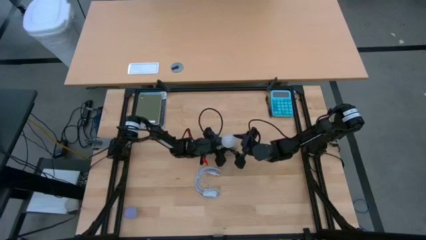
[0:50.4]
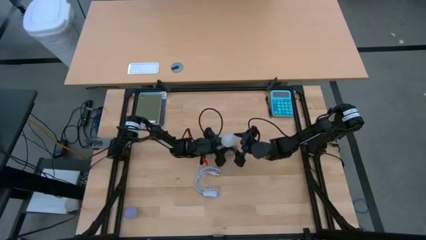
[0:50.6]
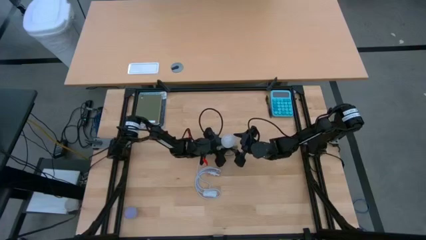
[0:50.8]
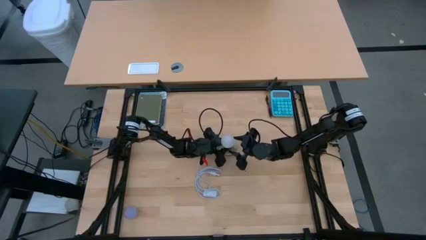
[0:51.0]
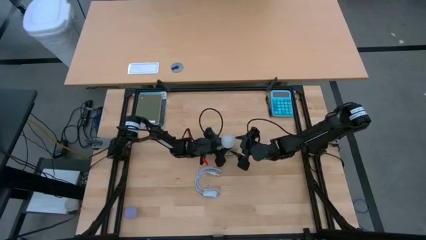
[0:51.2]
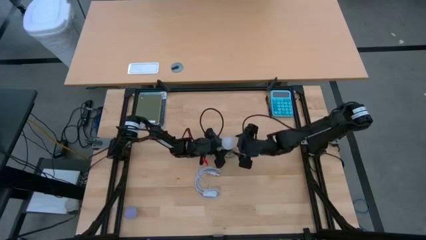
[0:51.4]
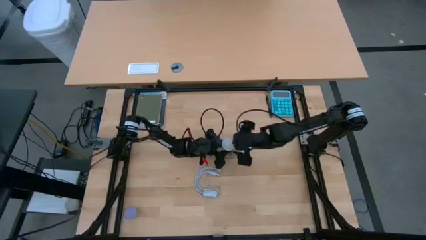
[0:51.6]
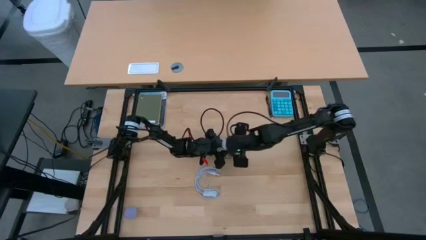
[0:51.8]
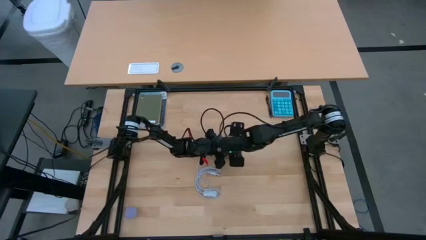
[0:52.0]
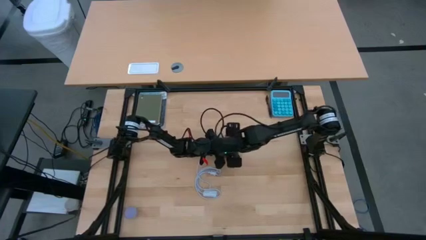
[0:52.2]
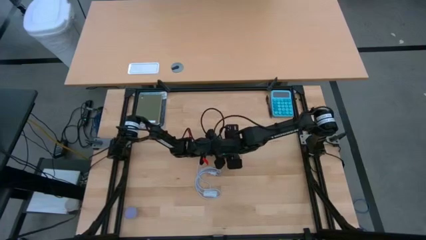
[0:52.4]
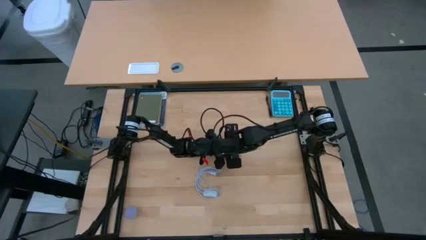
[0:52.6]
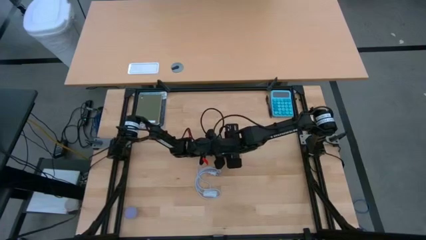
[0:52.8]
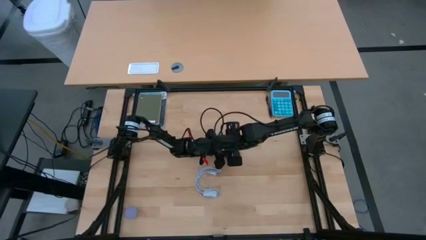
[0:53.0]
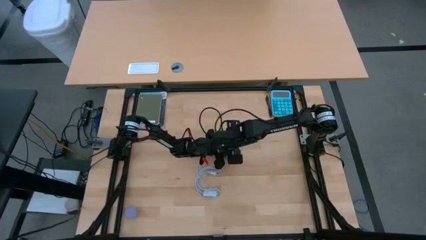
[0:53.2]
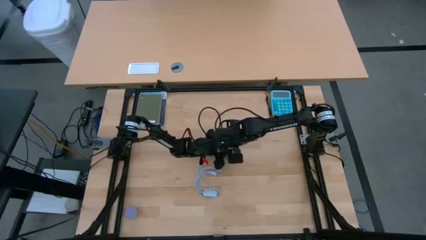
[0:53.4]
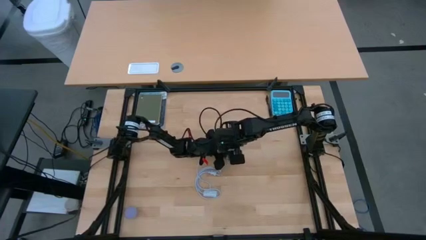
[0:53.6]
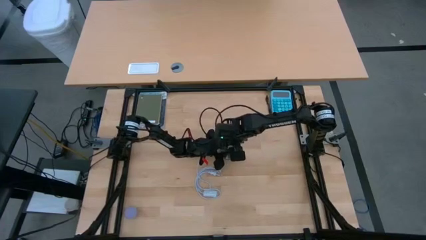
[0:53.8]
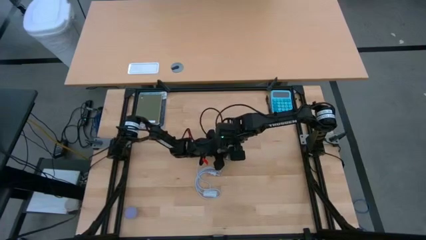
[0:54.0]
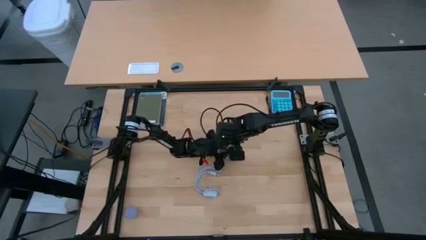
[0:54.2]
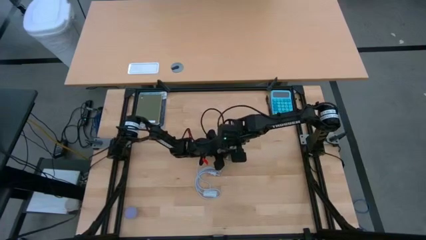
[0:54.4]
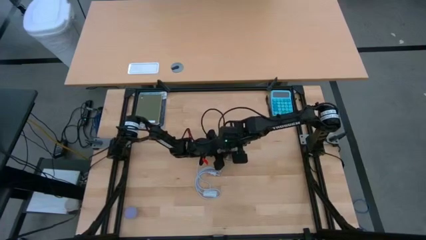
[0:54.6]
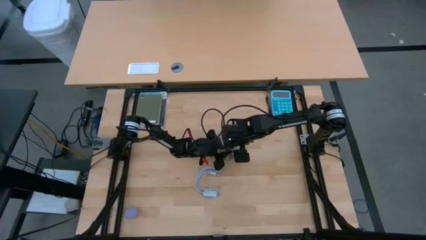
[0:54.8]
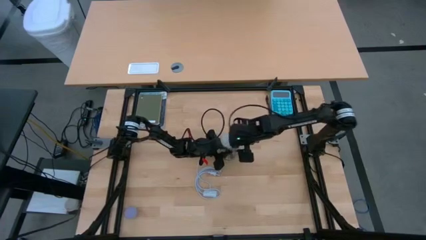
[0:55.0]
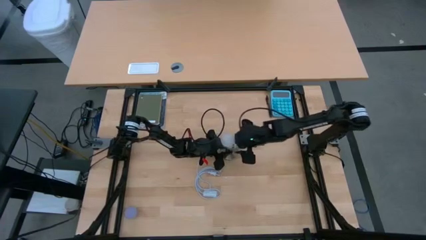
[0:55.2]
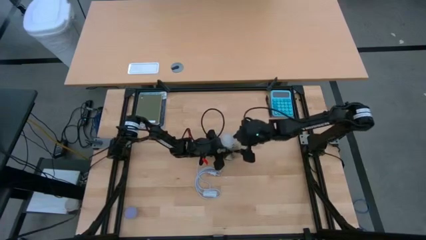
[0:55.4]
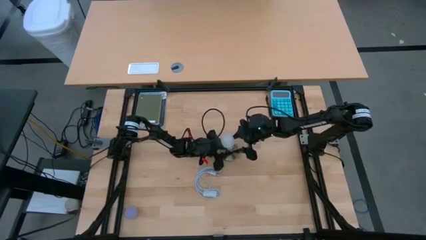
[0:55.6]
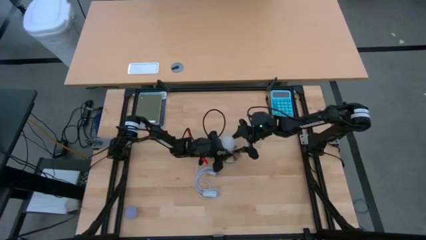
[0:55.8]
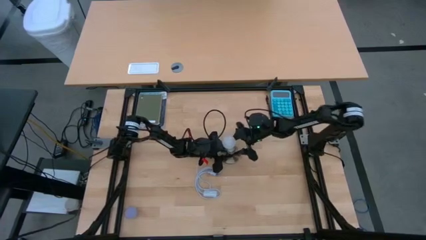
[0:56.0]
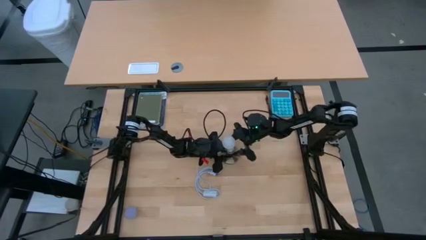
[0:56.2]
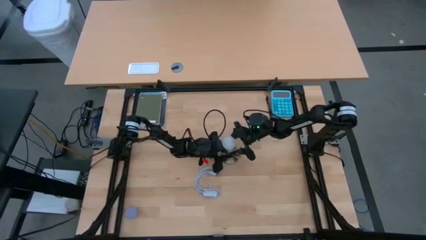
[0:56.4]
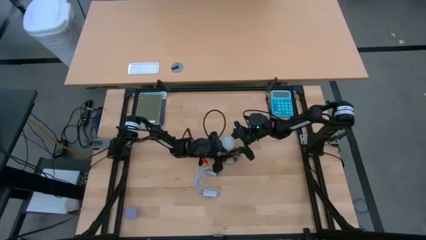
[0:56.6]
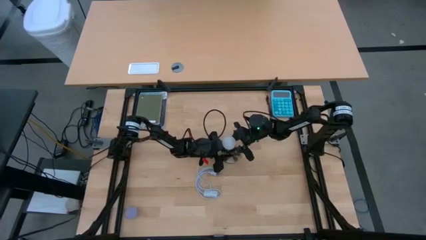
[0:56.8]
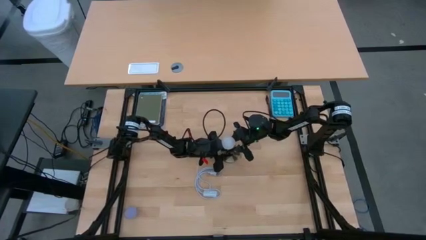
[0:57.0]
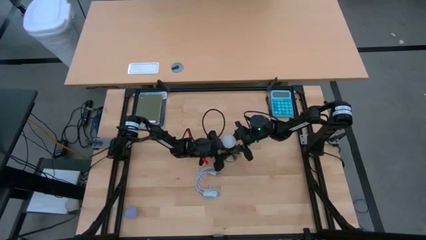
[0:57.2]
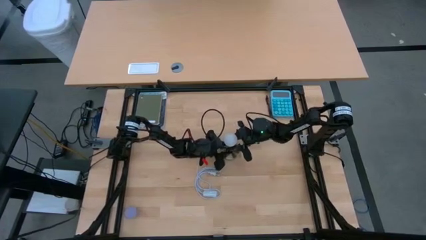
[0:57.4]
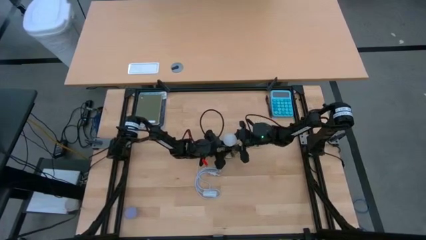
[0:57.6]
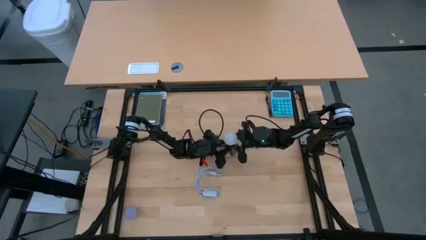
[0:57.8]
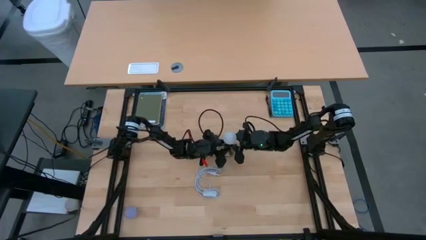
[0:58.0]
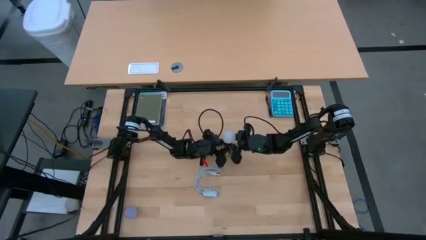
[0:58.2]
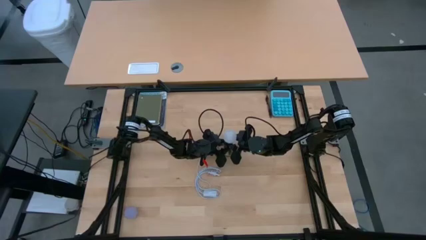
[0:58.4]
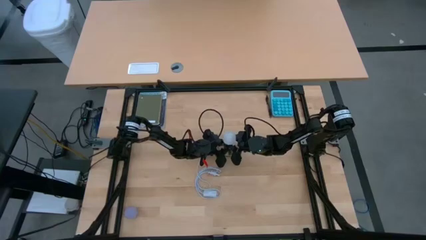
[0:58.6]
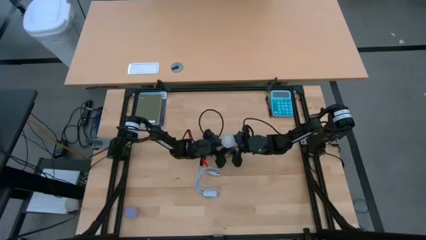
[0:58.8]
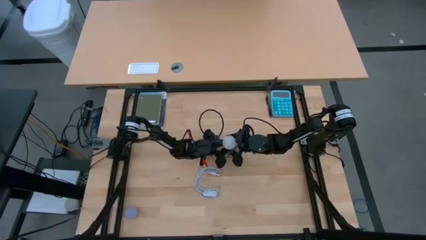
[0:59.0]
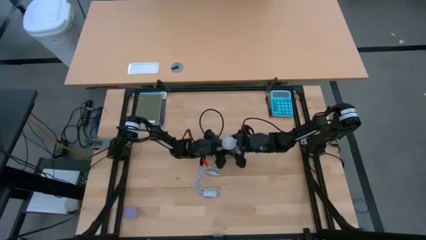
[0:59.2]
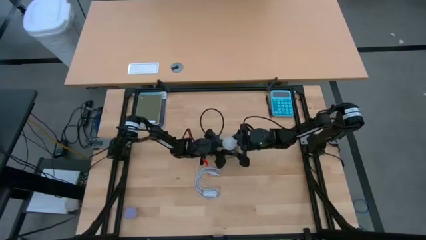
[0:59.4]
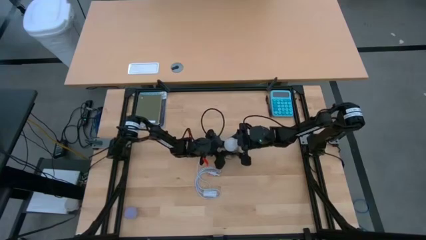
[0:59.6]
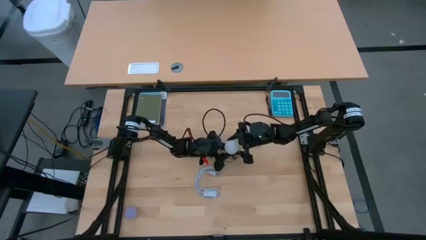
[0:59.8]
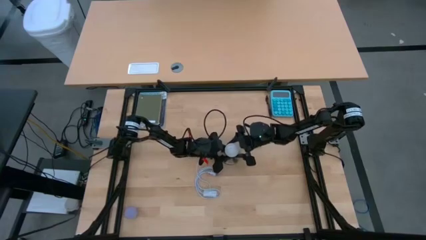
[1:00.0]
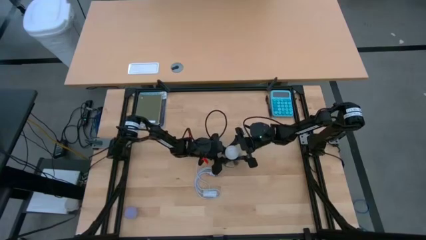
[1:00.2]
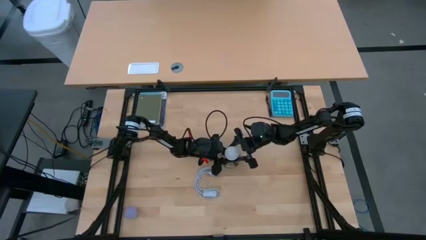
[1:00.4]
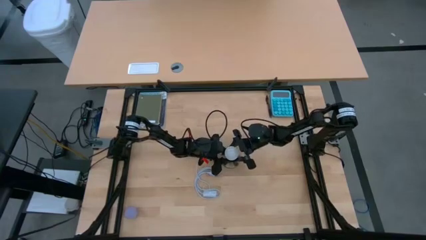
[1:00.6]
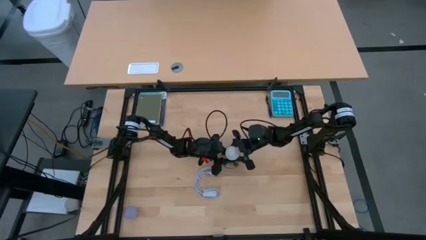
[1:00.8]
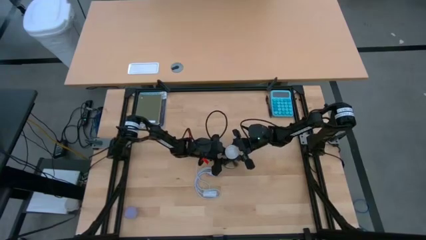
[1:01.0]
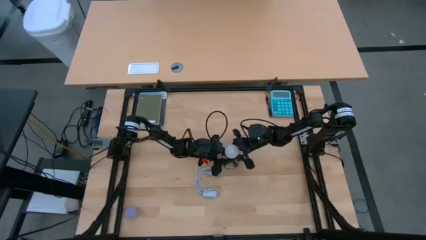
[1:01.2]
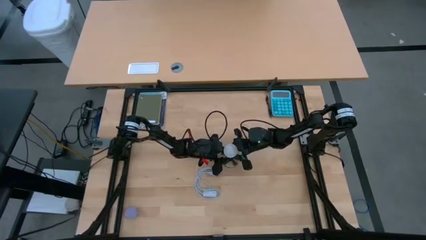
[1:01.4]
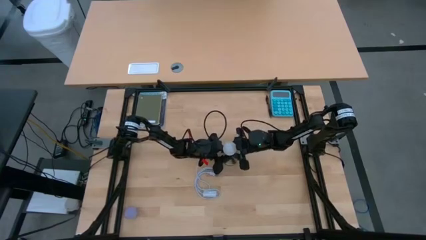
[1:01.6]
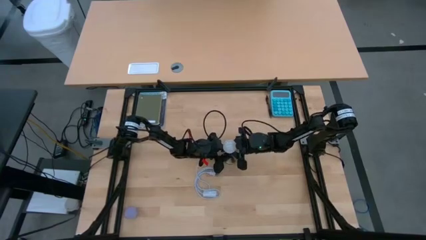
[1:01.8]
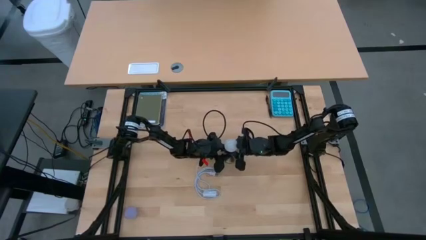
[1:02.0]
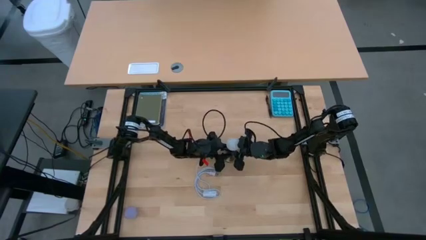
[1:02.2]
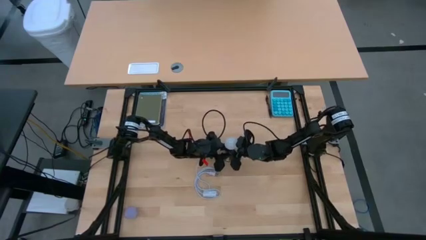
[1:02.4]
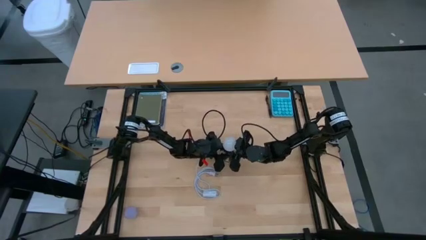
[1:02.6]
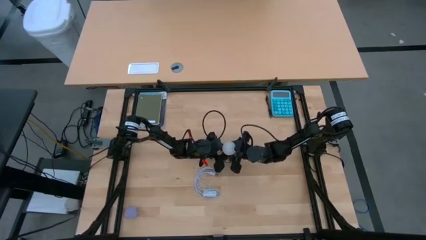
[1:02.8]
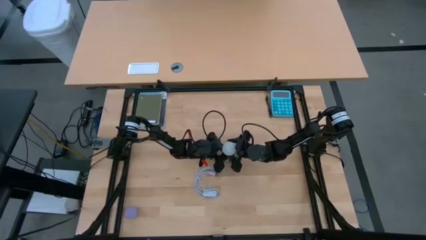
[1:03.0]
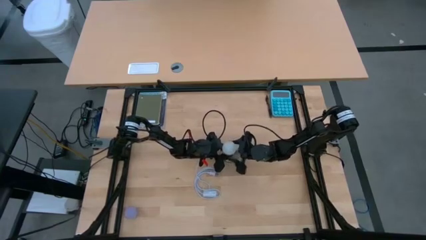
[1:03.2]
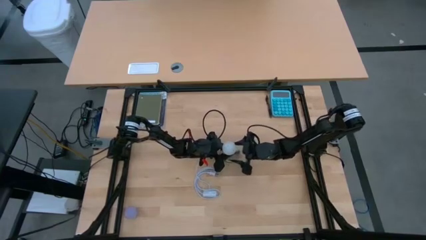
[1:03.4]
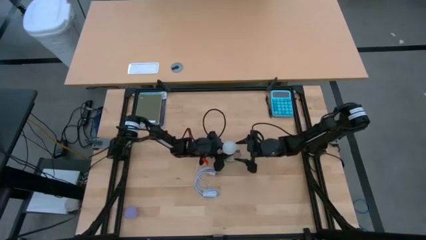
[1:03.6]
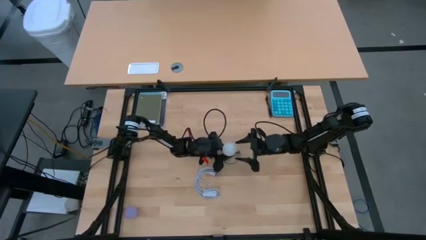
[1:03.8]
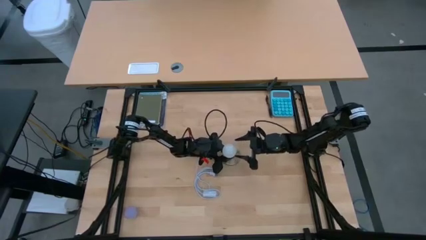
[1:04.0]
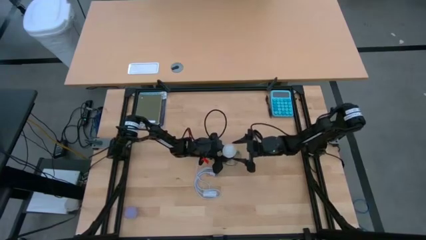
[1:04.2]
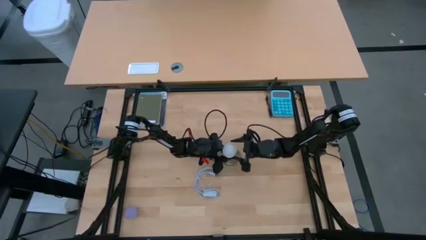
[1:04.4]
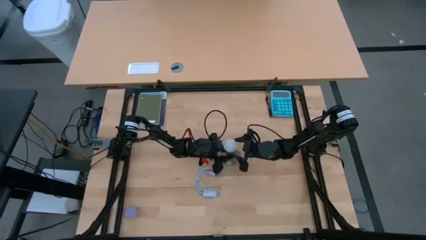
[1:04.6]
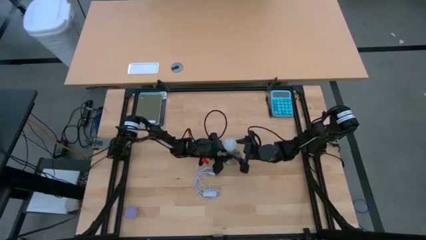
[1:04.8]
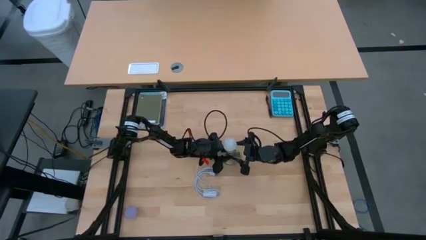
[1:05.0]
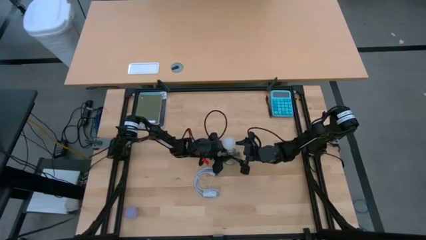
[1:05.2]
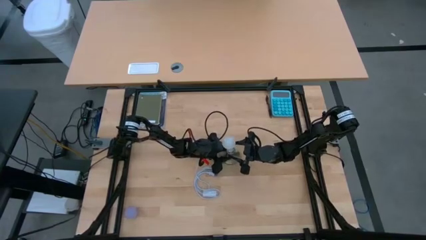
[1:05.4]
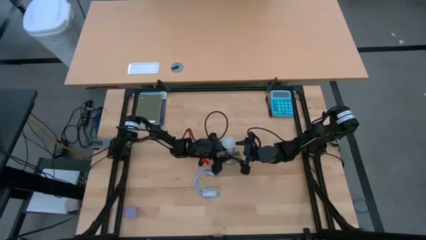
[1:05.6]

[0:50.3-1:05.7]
Task: Screw lightbulb
Insert the white lightbulb into the silver lamp
